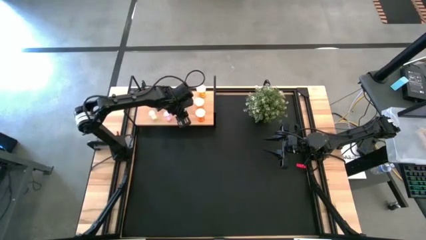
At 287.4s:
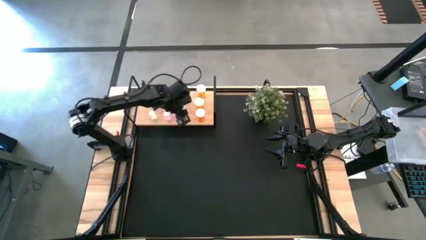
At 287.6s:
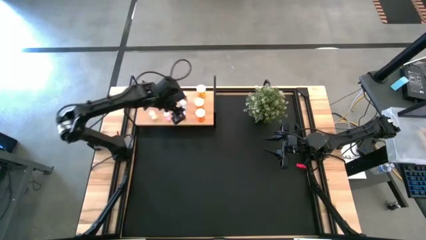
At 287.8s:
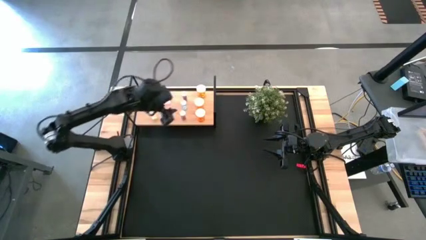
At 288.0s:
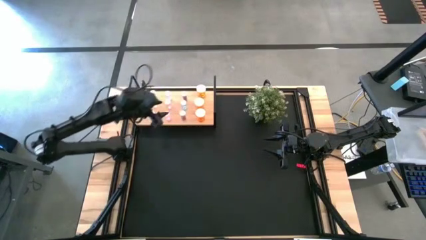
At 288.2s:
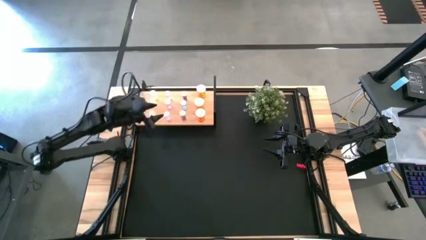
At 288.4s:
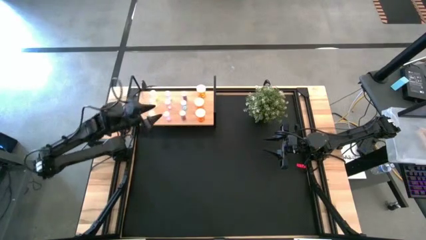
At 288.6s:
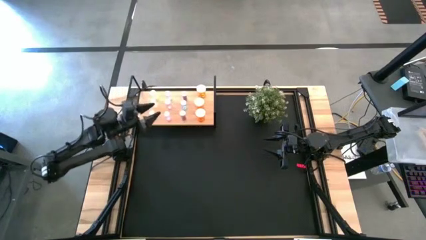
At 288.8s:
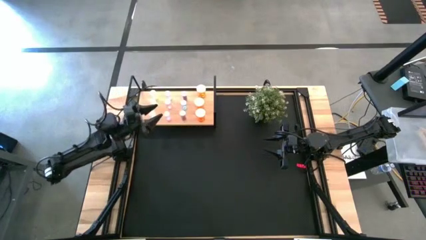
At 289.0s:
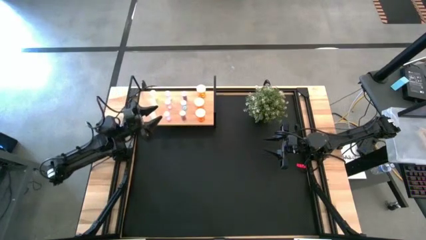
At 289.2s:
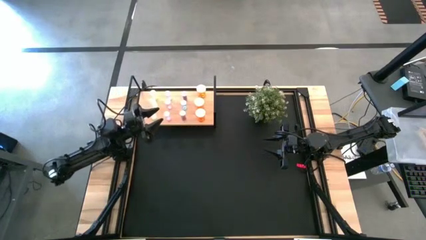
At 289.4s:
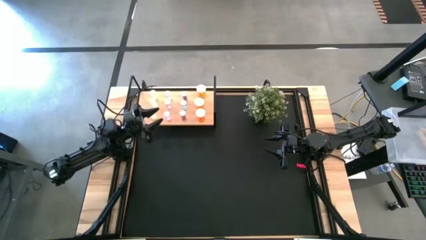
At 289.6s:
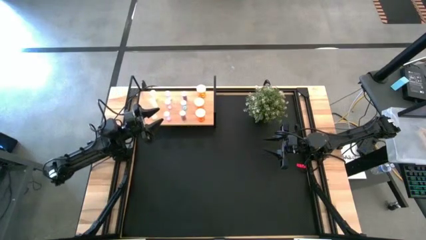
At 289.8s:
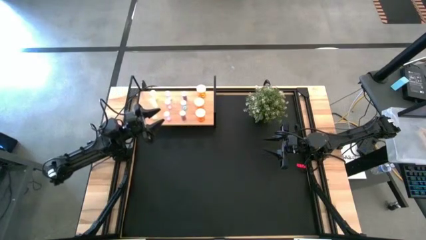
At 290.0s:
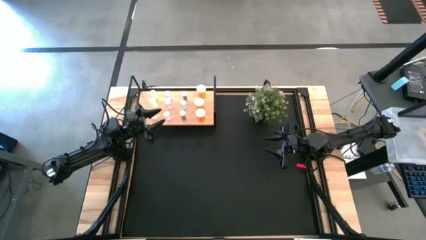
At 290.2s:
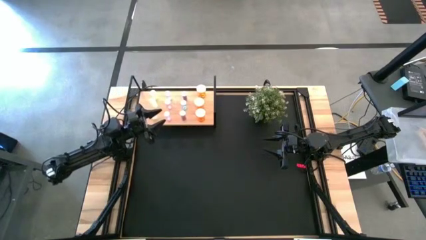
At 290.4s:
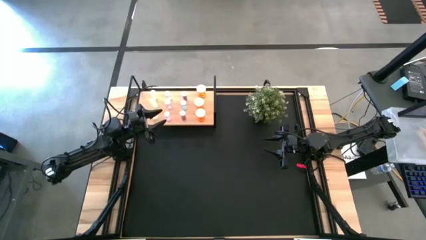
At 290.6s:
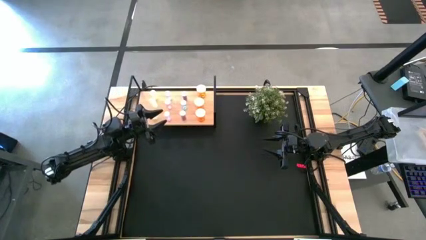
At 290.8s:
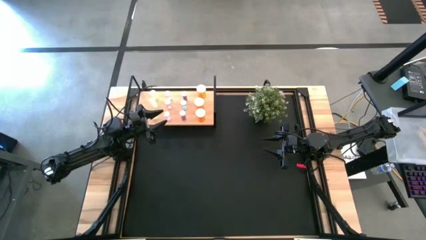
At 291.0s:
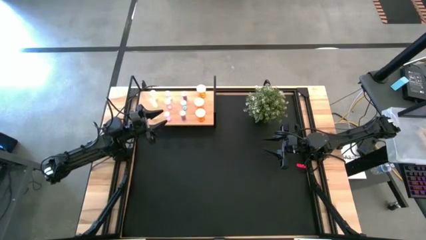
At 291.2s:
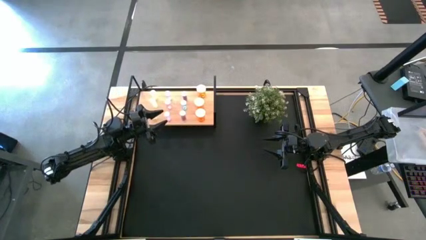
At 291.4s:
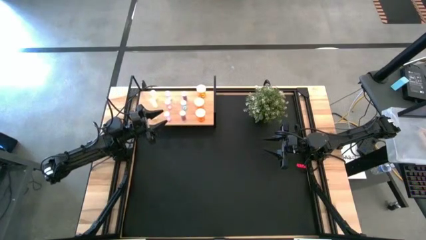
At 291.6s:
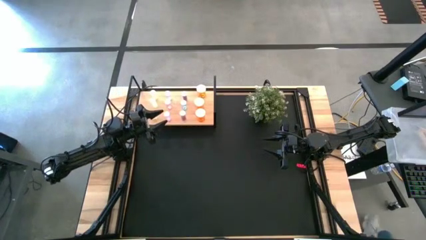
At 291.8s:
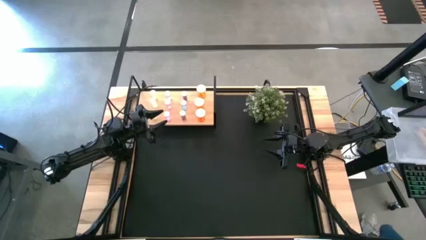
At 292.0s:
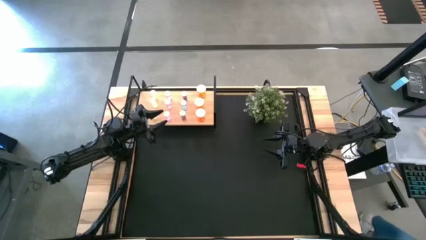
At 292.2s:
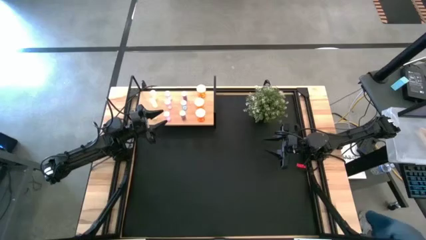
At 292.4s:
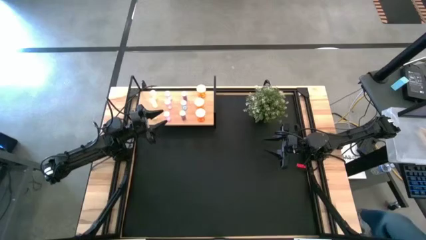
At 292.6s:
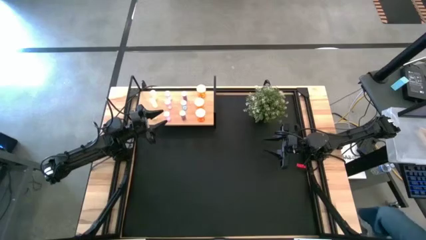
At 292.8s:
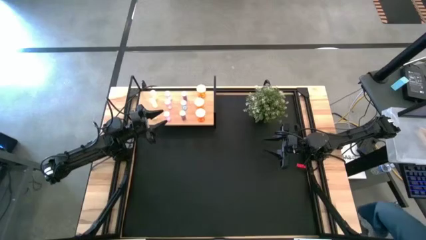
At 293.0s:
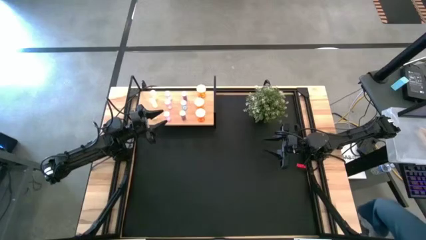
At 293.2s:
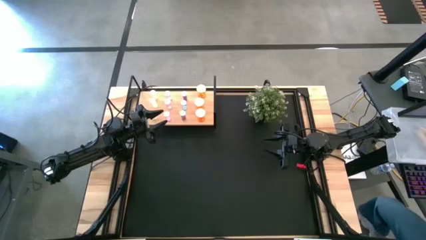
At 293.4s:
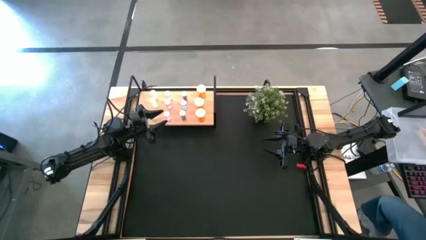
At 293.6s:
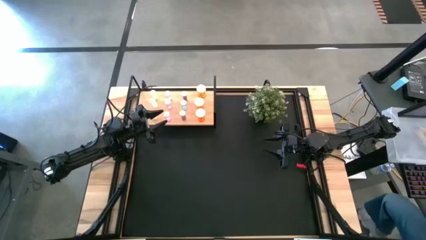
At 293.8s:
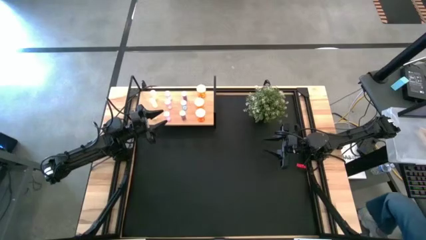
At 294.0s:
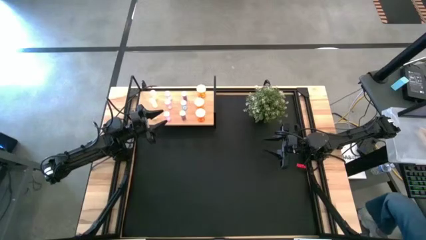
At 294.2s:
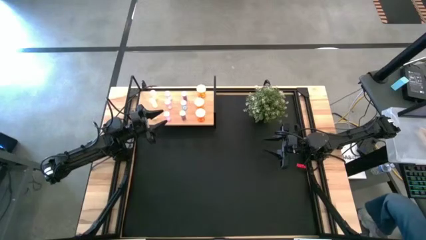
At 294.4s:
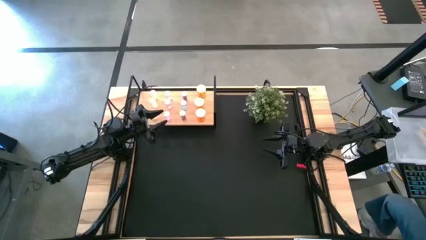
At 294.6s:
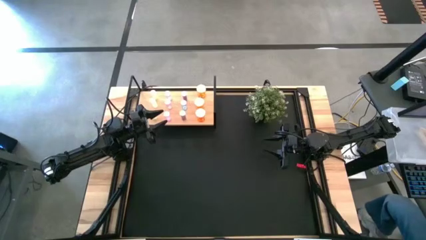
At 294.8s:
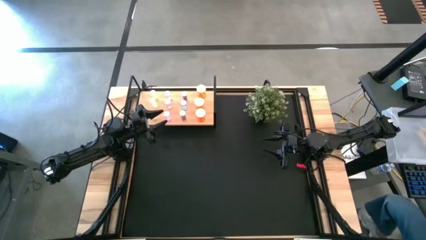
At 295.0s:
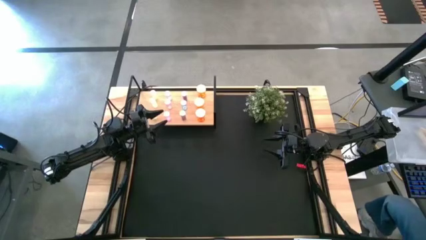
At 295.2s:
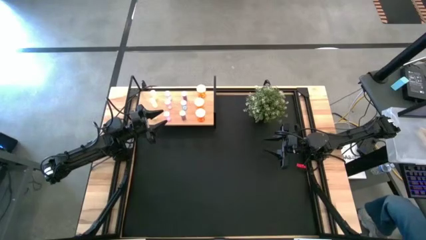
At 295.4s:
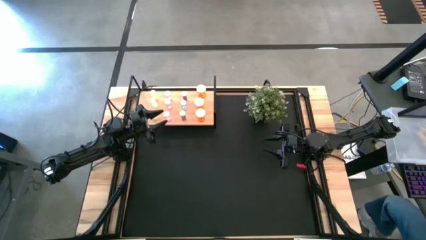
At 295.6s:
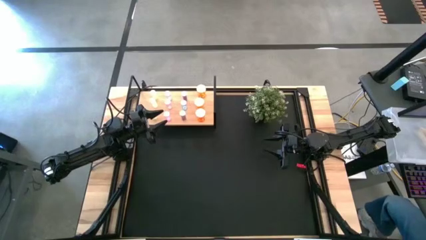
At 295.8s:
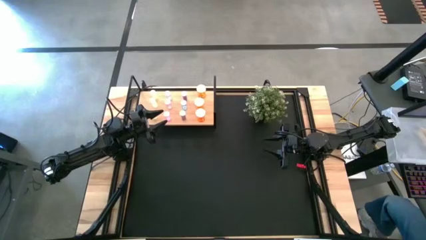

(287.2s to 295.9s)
Task: Pick and place medicine bottles onto shelf by color
Return to Home Position

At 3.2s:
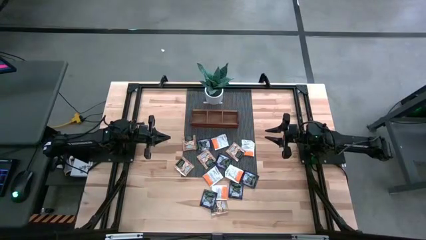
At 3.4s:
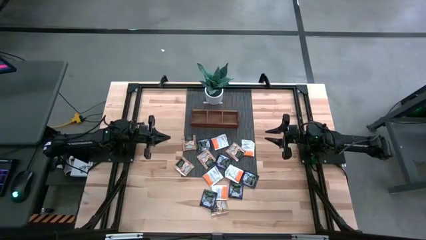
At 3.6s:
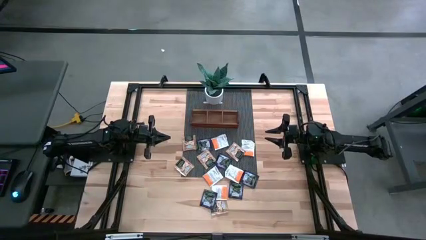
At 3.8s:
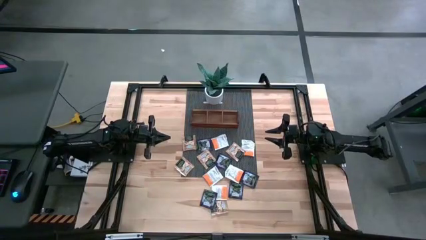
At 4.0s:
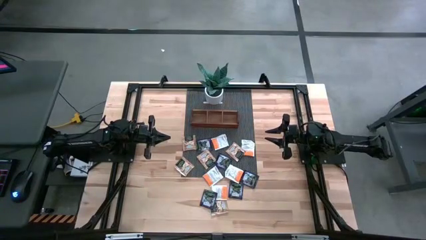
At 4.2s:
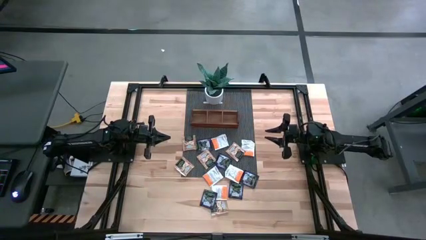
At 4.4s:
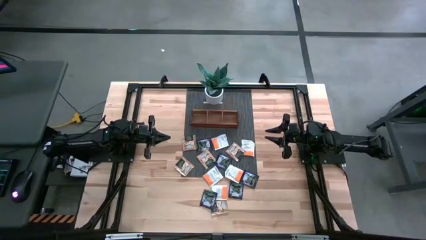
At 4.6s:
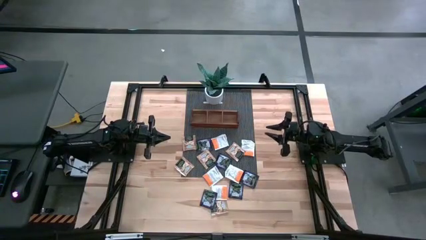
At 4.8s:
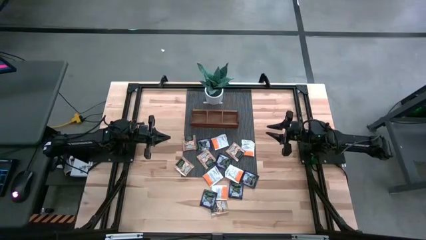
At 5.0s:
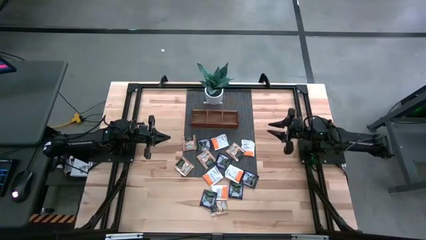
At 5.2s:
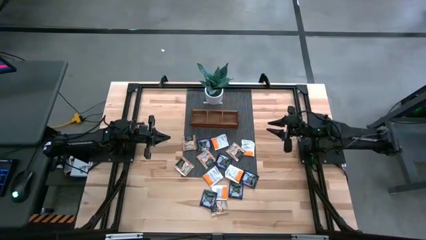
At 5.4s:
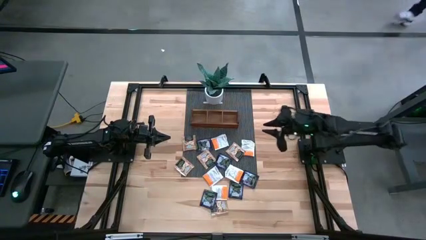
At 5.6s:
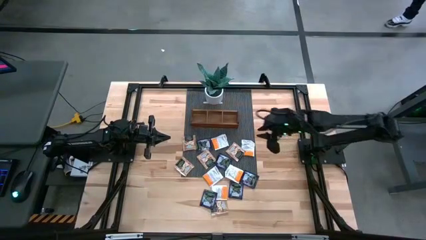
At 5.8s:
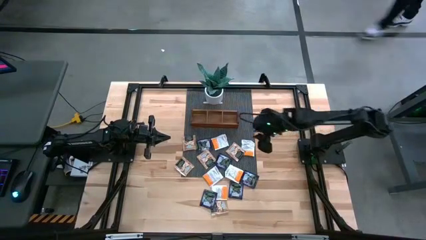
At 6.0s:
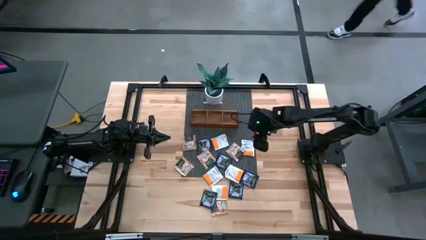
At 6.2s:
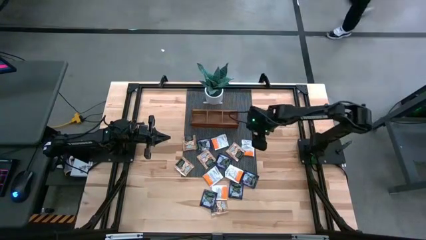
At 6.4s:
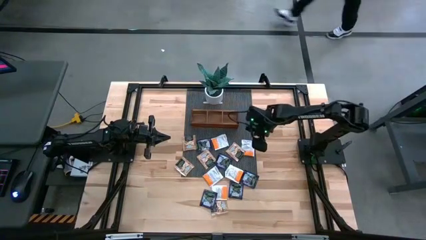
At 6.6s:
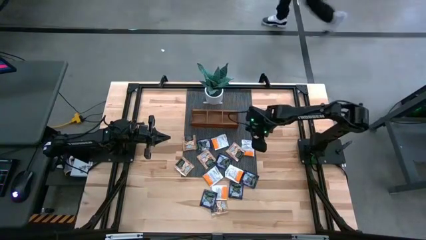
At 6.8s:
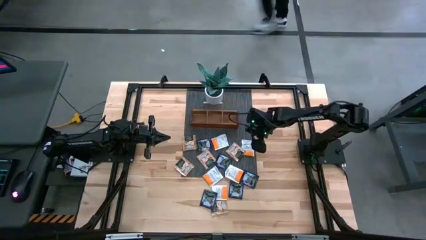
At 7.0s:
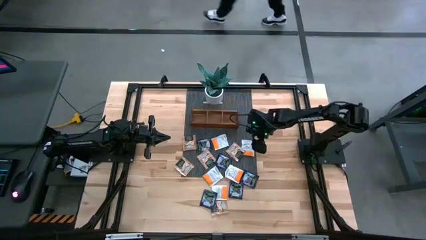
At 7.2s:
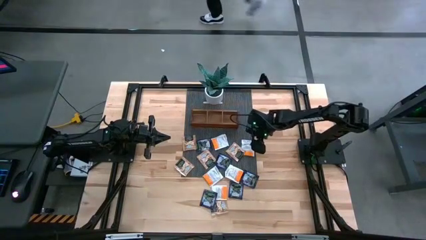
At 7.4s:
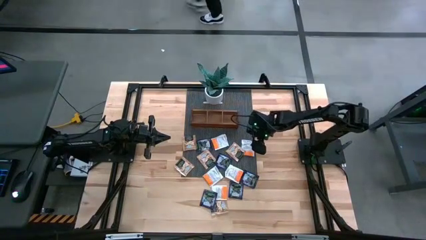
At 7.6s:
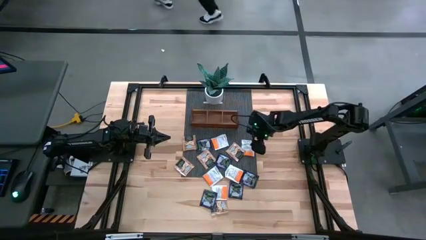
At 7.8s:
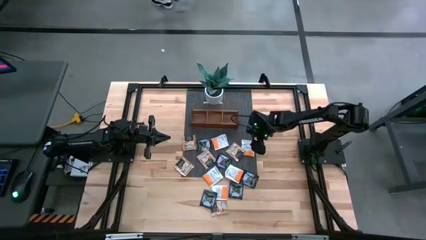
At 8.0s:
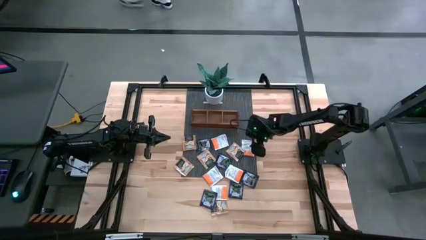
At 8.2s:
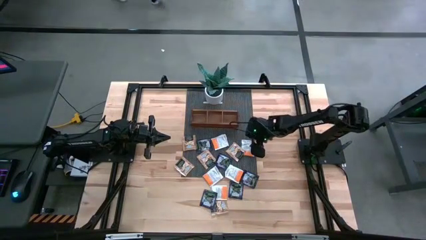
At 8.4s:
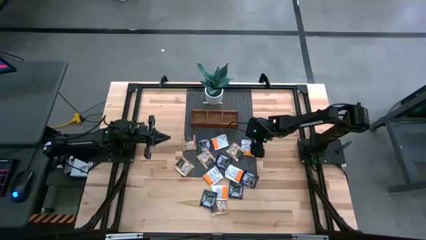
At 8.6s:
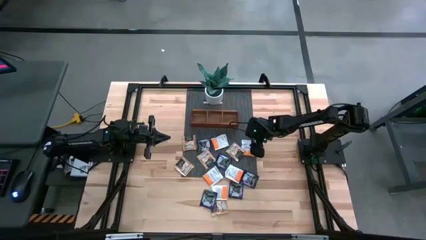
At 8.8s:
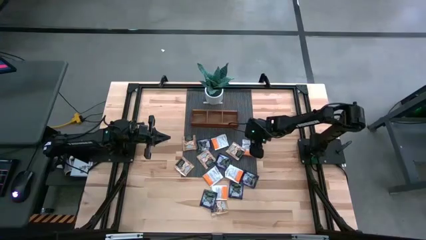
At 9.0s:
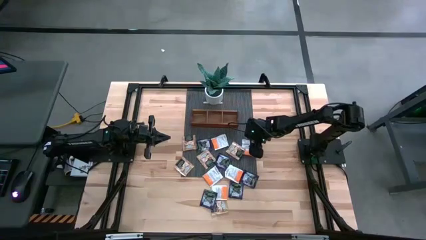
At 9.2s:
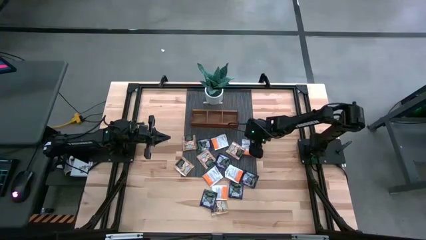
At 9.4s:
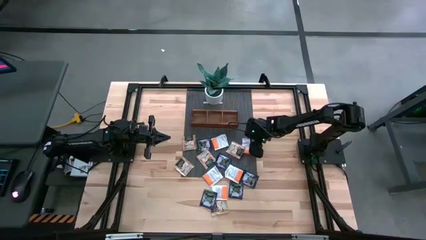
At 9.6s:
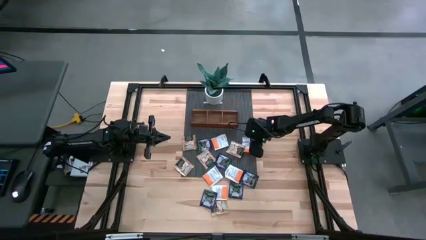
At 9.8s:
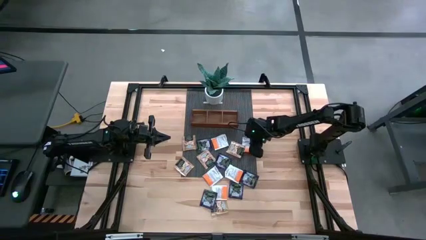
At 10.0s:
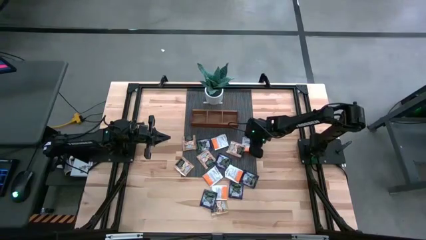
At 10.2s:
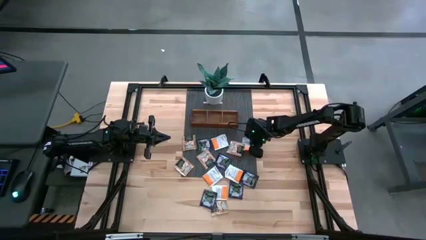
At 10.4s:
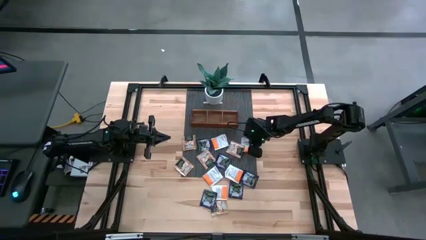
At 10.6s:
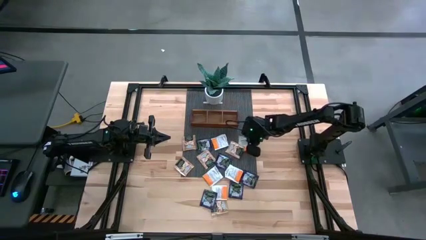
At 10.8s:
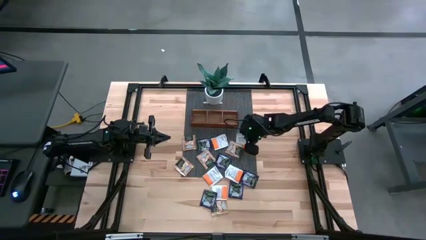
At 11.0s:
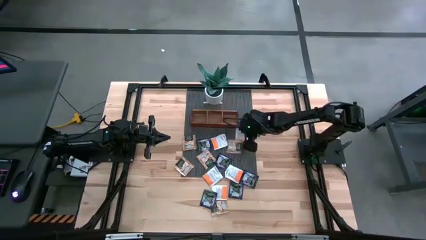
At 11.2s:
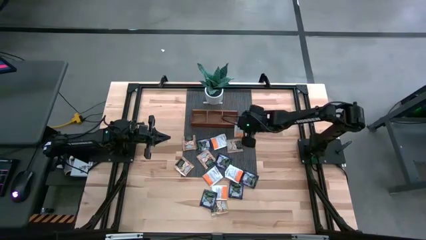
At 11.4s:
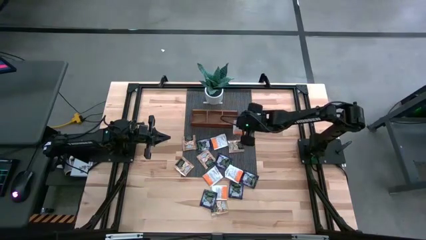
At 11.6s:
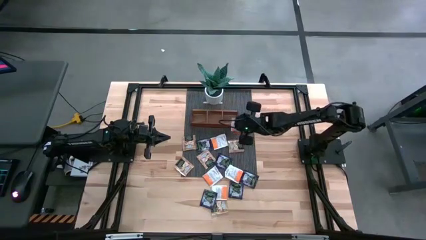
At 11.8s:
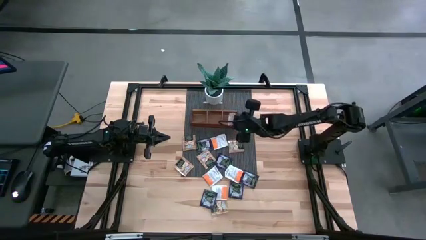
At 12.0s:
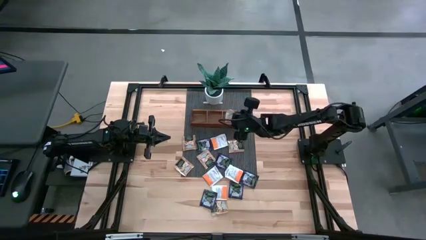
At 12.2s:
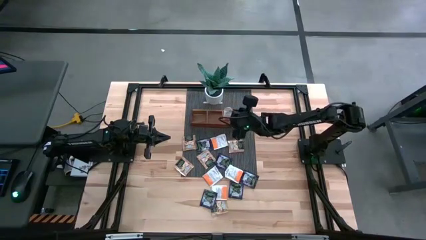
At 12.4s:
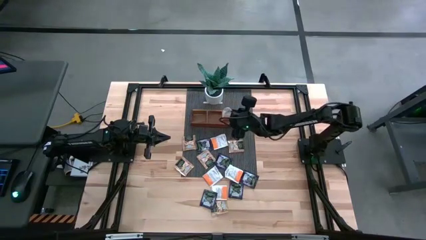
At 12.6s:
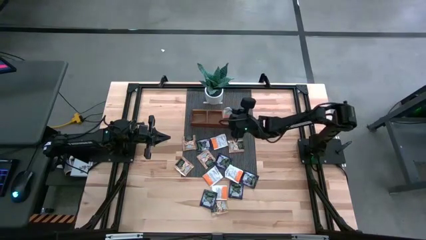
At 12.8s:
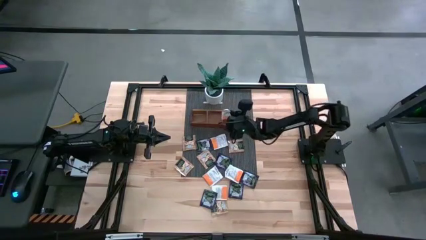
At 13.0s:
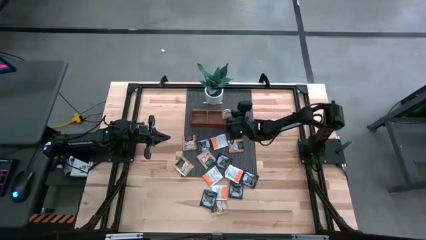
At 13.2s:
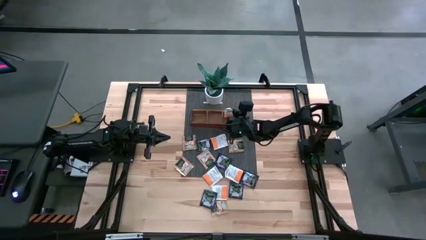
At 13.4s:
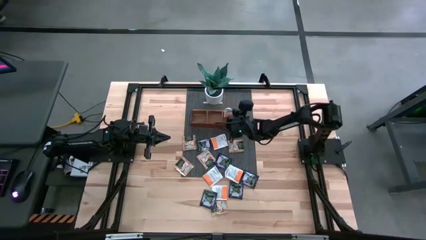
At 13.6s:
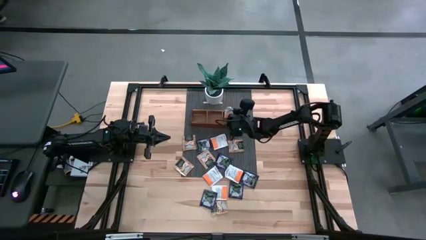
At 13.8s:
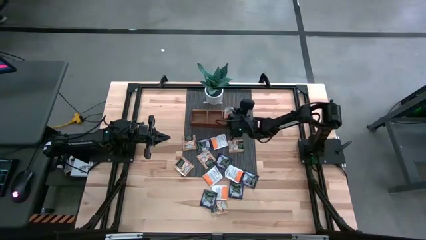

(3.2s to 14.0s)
Task: Pick & Place Tea
Put the orange tea bag into the right section of the wooden organizer
